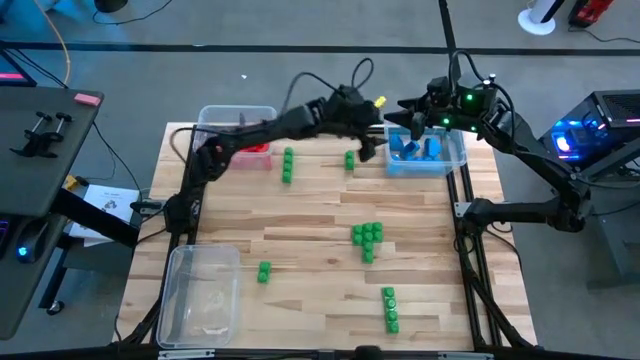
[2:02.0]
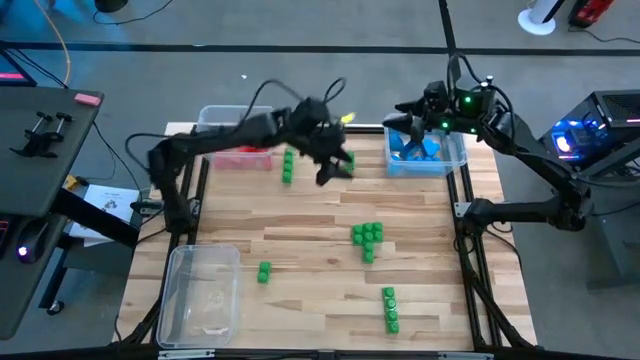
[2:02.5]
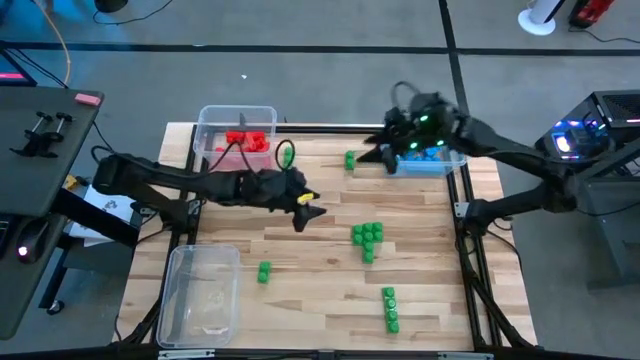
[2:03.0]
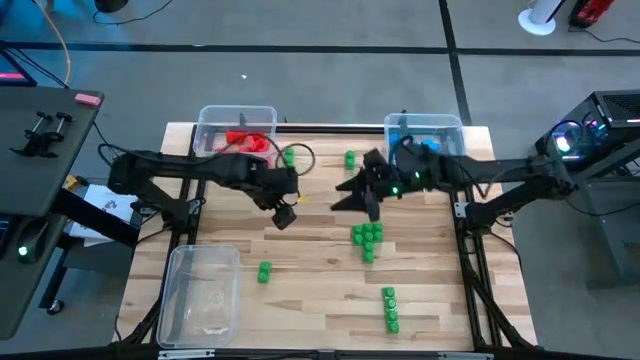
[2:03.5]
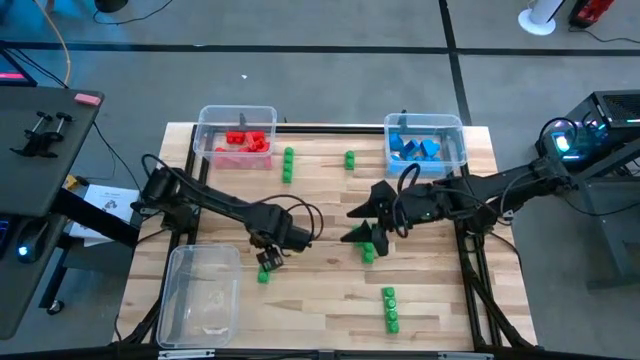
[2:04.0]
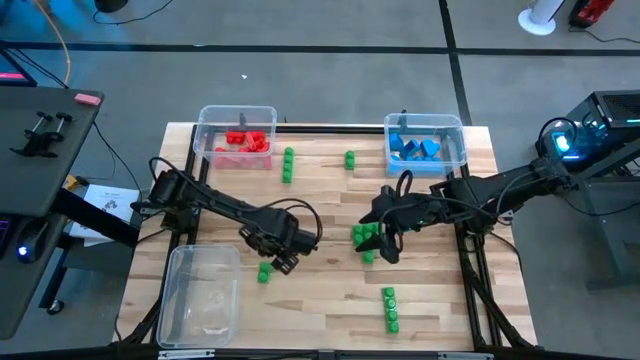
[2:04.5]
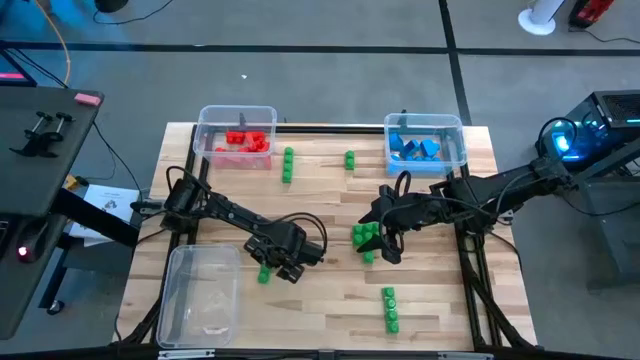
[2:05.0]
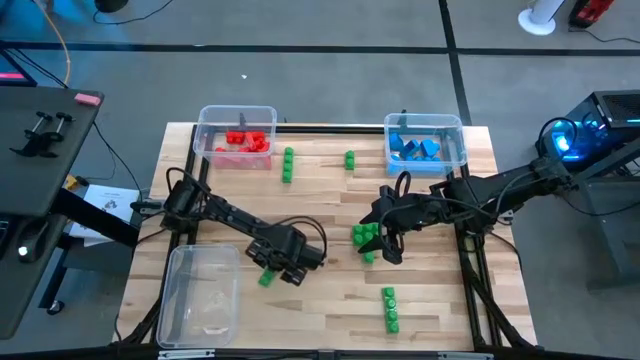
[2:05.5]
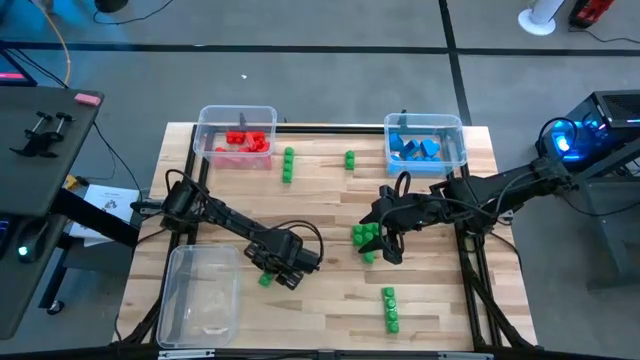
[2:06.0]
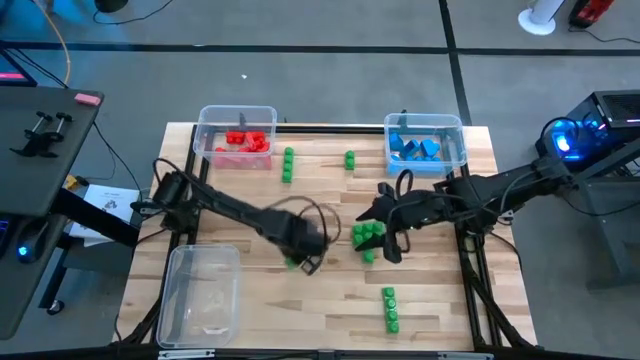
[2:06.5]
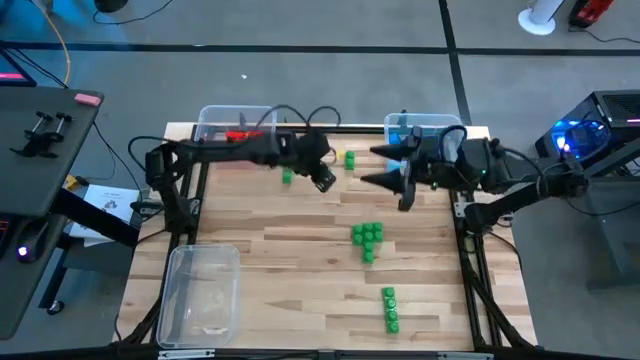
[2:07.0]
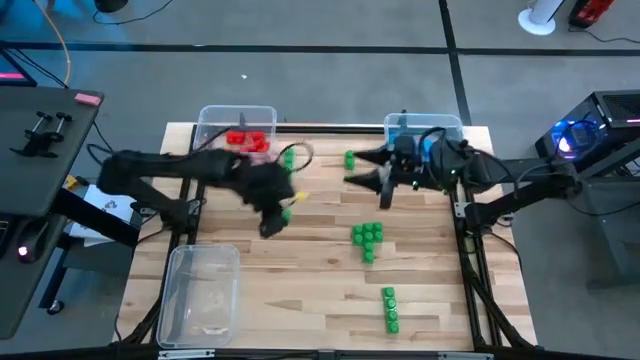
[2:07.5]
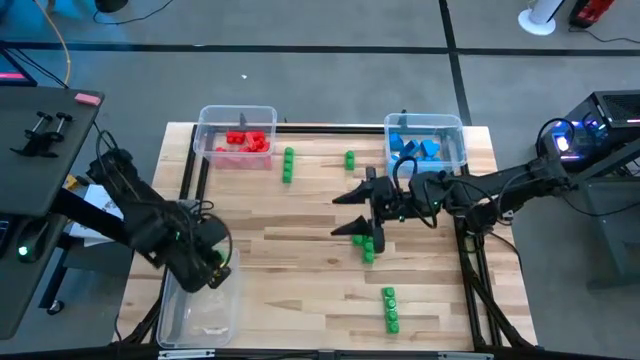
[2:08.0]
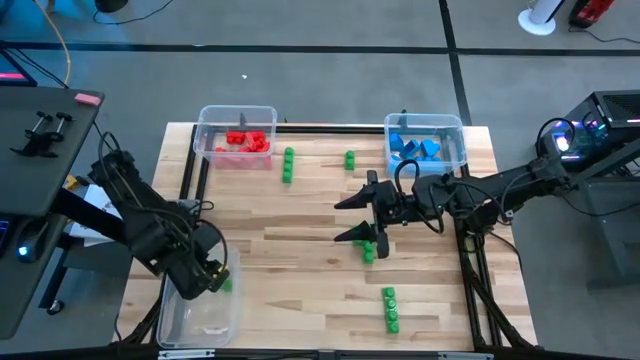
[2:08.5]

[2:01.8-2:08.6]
Task: Sort blocks
Put the green game piece into the bottom left transparent bin

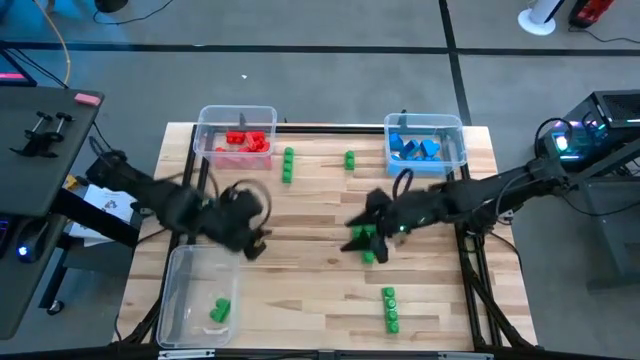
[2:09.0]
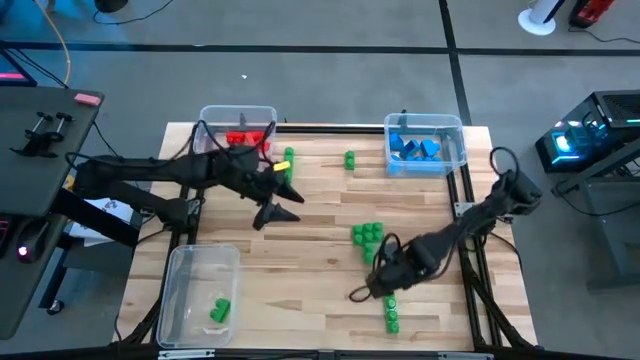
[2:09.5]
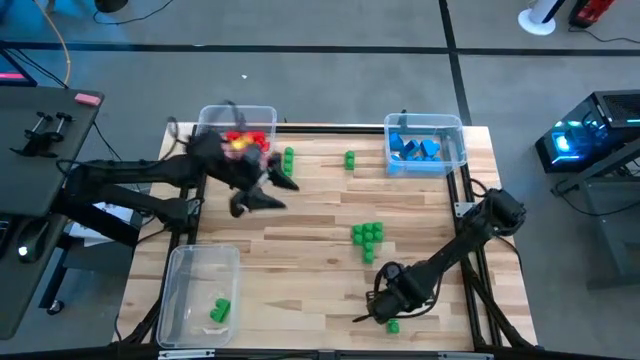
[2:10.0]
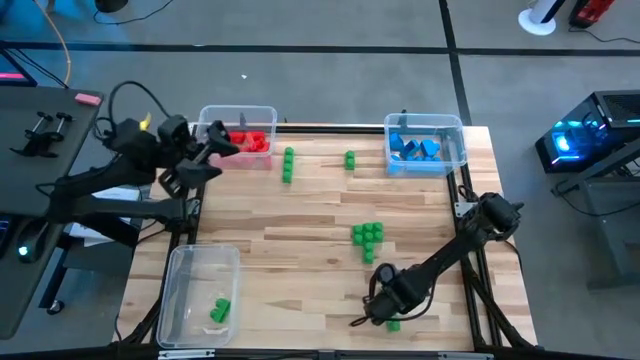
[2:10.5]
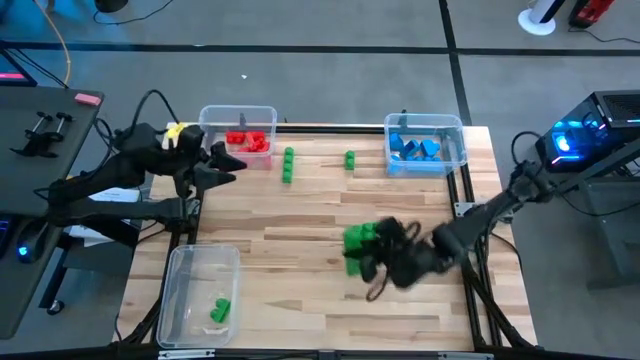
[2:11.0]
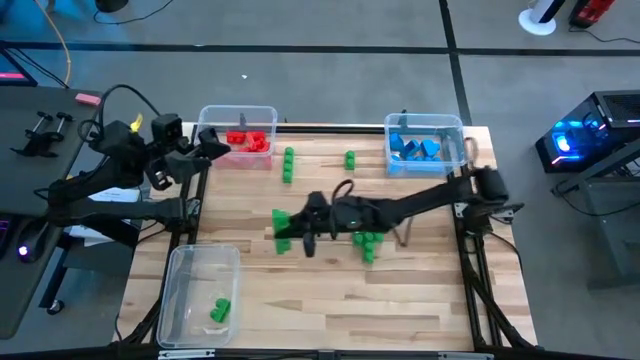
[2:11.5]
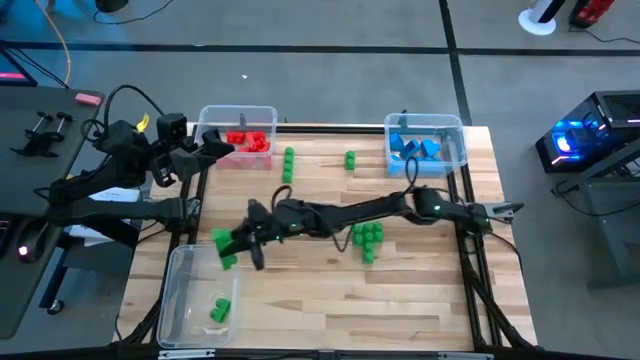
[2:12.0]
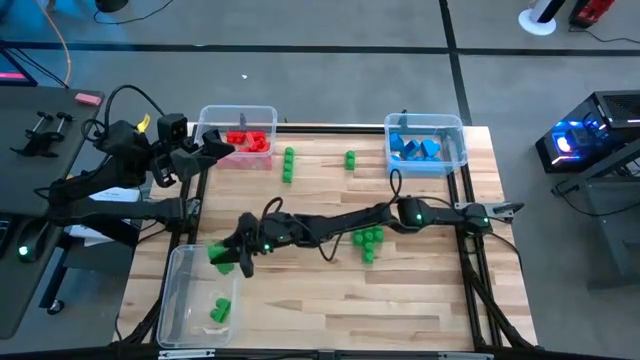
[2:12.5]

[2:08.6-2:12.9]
Put the green game piece into the bottom left transparent bin

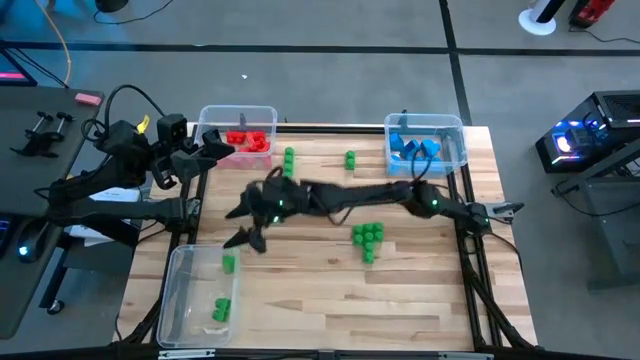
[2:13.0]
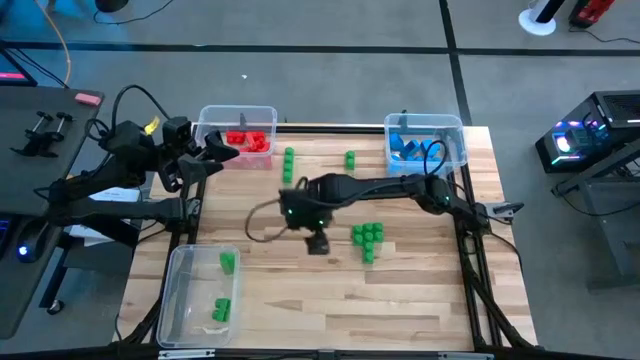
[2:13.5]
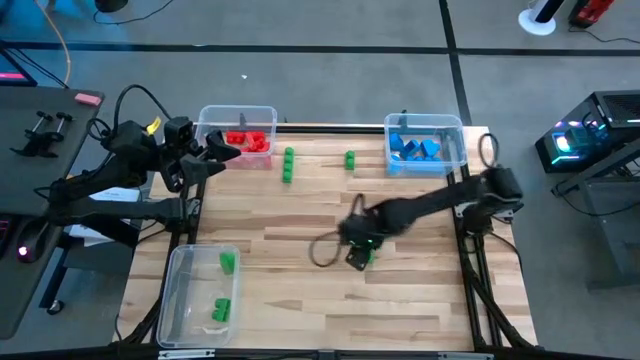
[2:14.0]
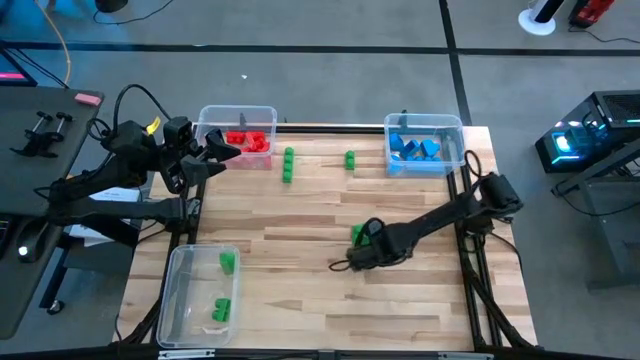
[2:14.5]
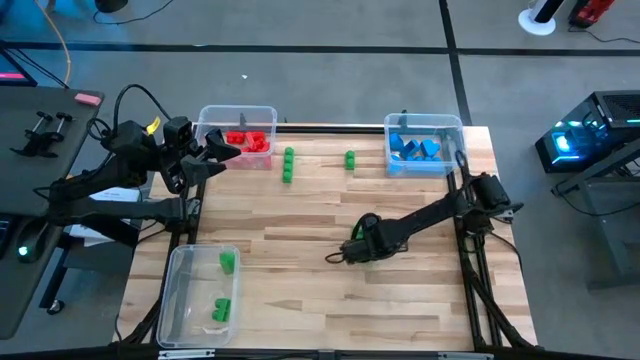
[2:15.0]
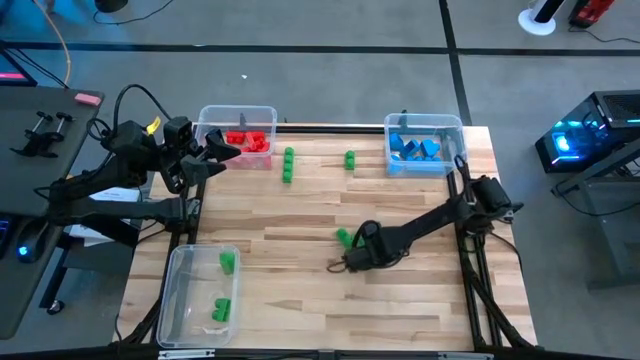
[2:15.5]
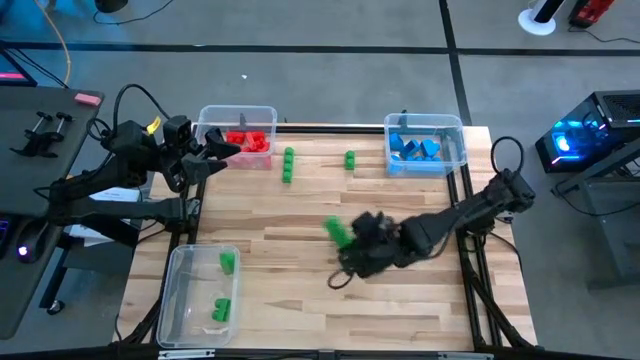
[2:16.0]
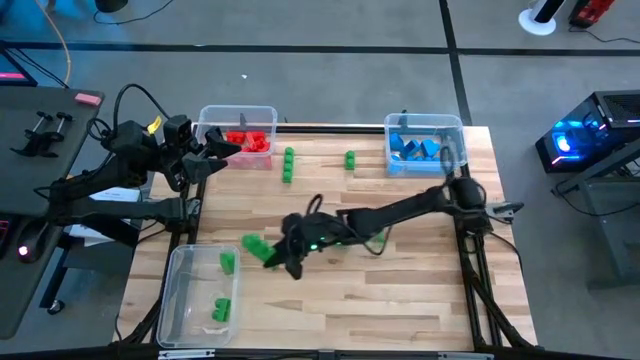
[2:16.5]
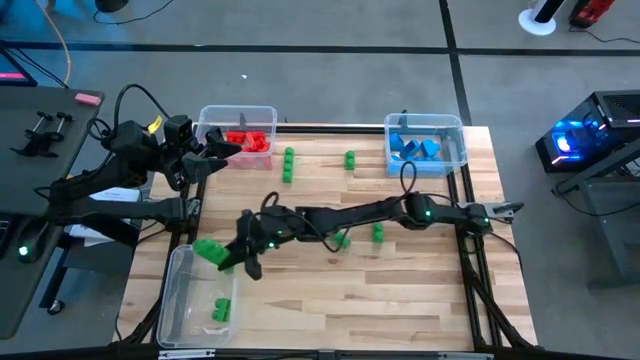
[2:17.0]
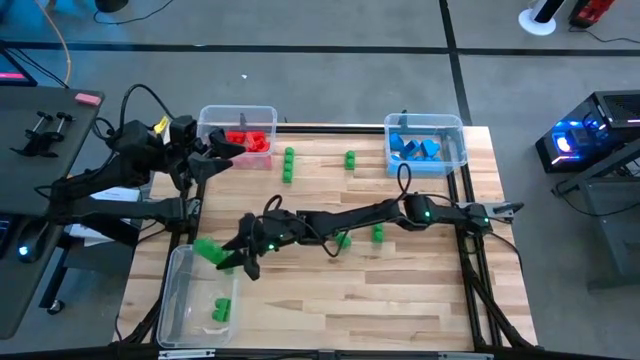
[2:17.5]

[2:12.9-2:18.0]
Put the green game piece into the bottom left transparent bin

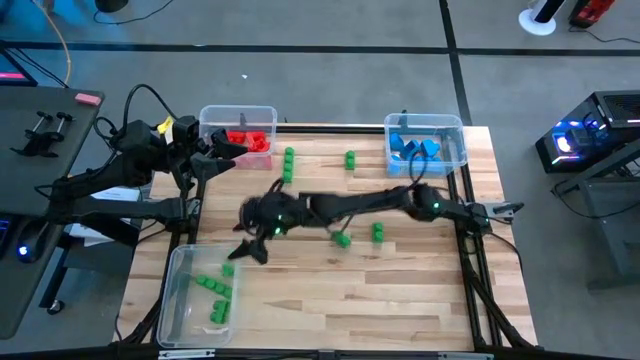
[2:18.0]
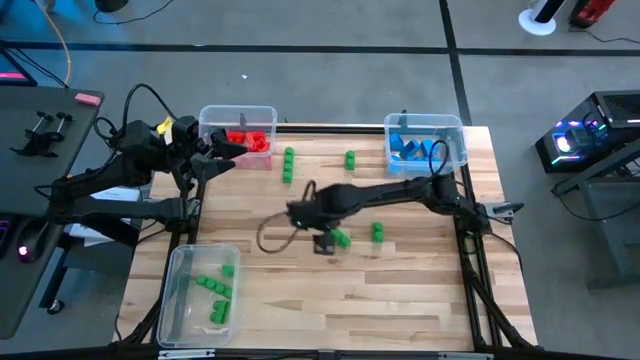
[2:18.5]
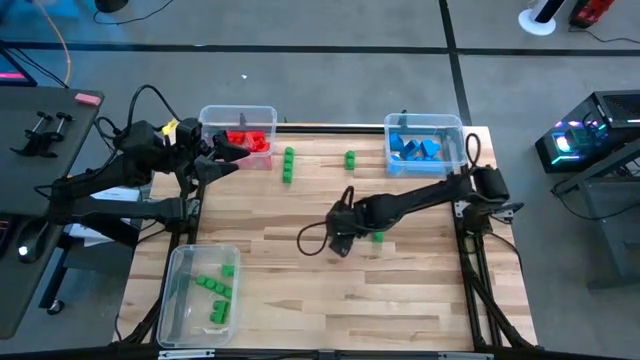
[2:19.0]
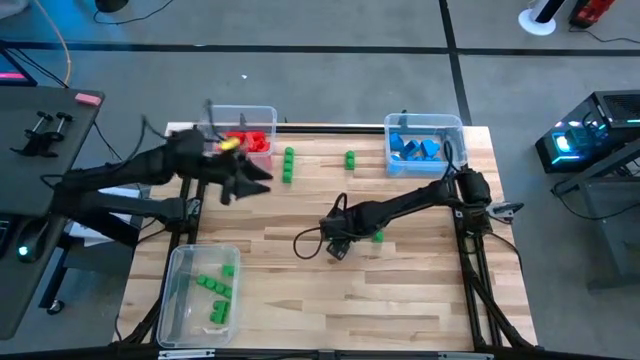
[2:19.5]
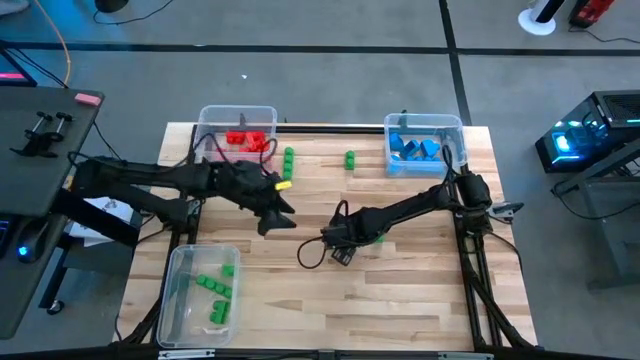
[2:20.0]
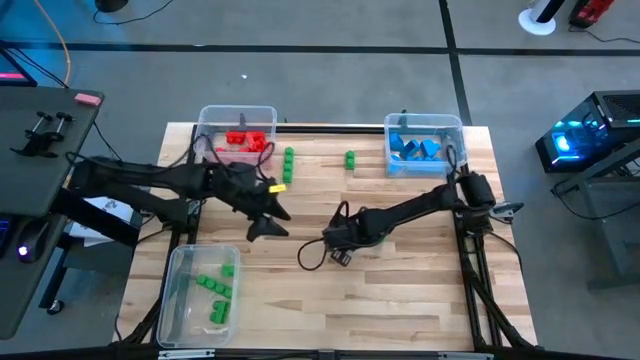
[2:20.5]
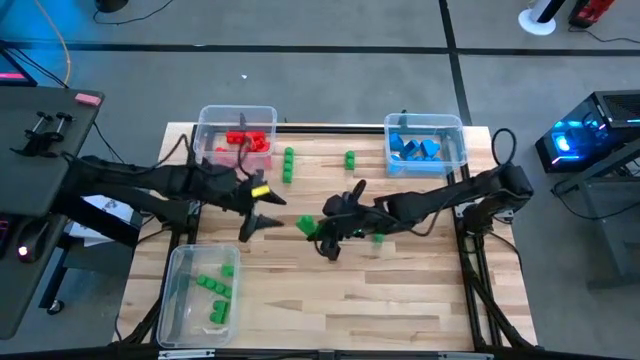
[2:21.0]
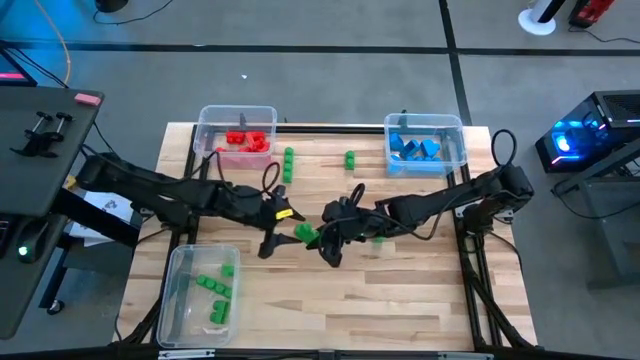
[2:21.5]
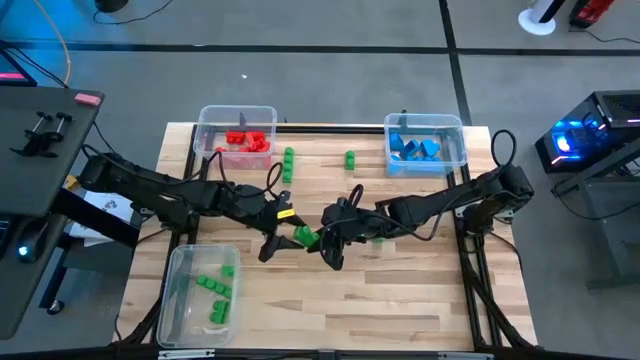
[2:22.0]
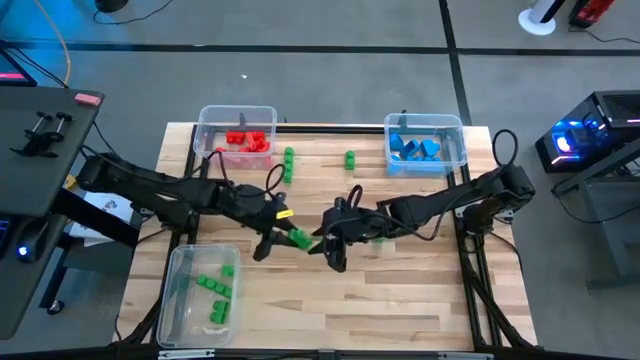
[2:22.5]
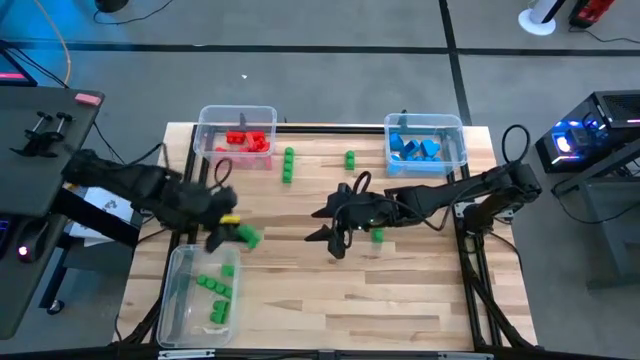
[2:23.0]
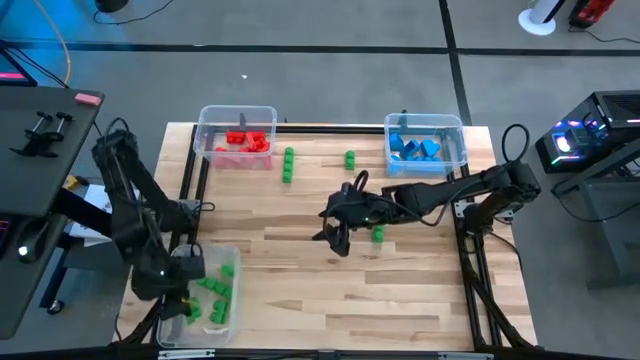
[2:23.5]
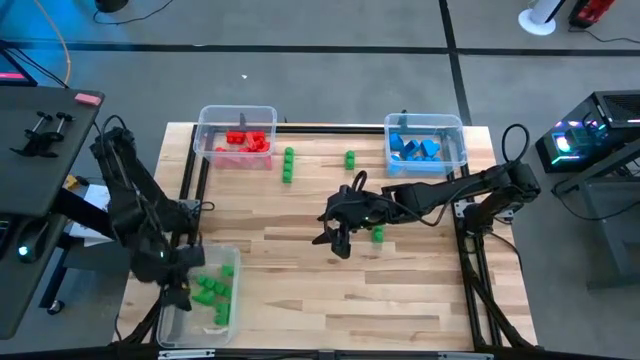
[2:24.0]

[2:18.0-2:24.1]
Put the green game piece into the bottom left transparent bin
